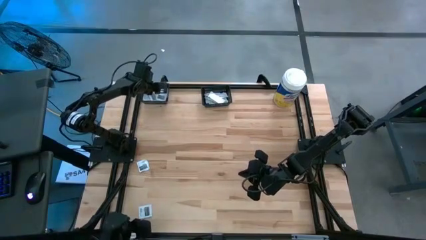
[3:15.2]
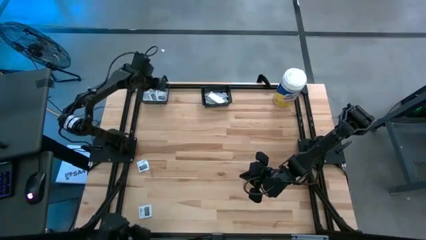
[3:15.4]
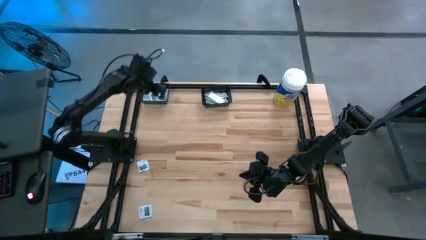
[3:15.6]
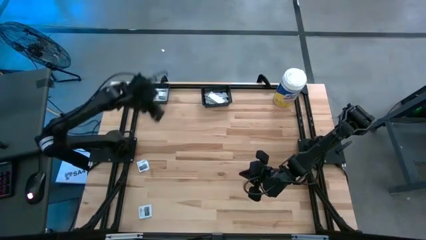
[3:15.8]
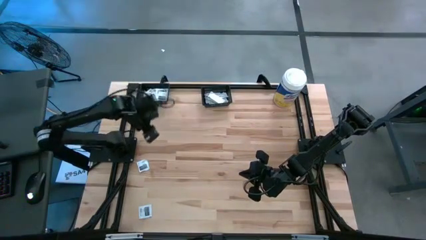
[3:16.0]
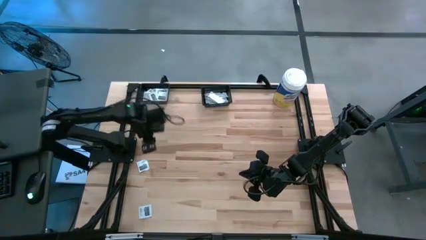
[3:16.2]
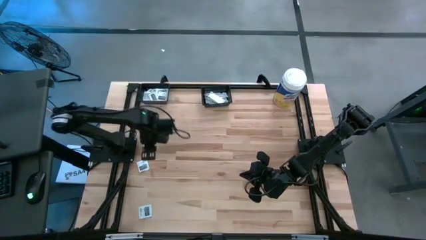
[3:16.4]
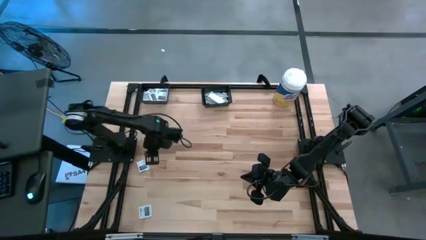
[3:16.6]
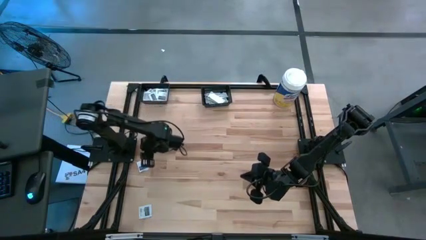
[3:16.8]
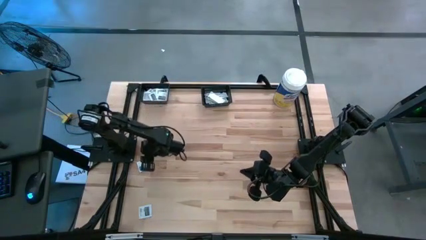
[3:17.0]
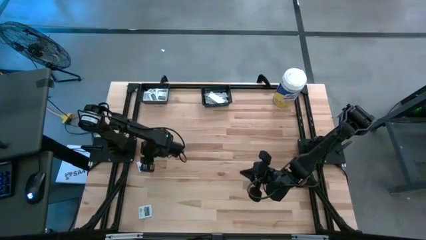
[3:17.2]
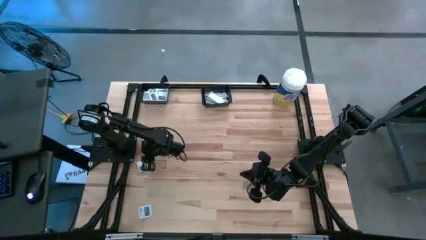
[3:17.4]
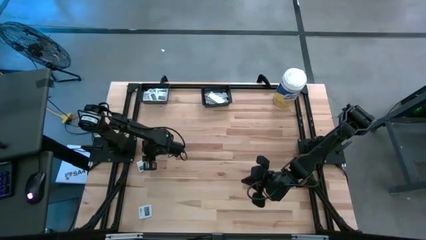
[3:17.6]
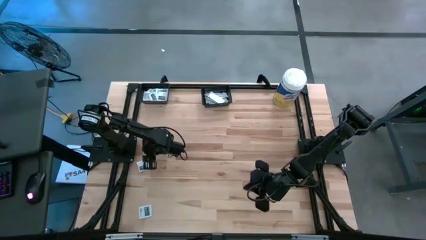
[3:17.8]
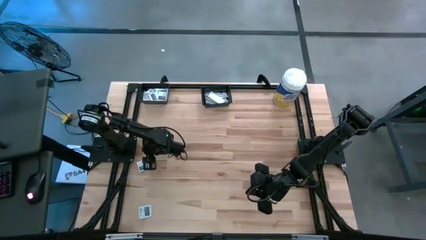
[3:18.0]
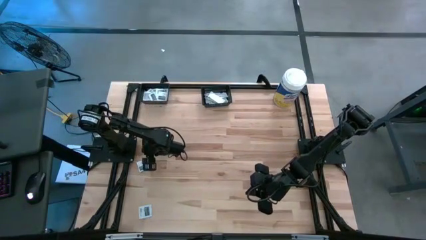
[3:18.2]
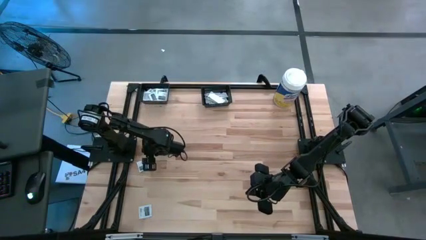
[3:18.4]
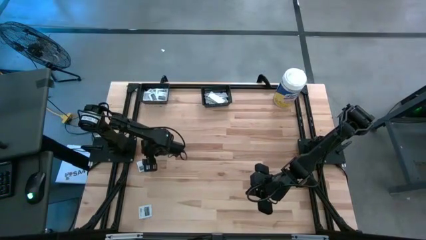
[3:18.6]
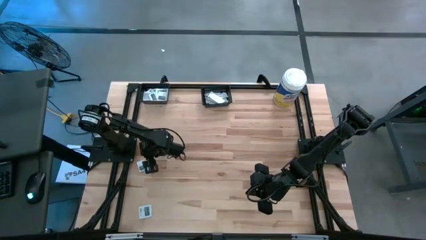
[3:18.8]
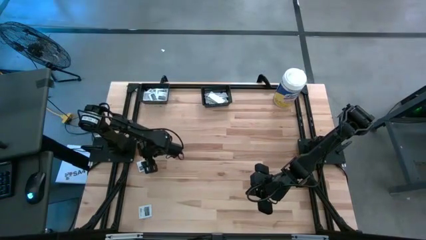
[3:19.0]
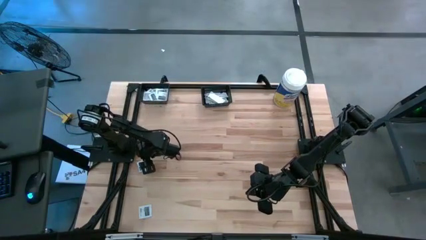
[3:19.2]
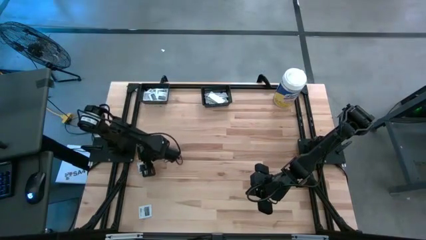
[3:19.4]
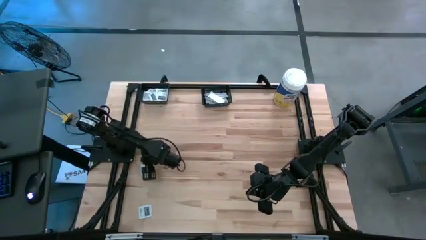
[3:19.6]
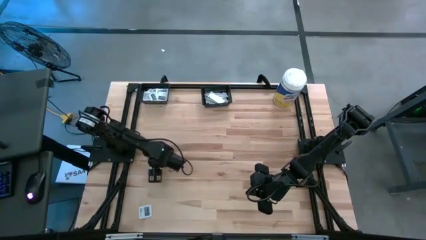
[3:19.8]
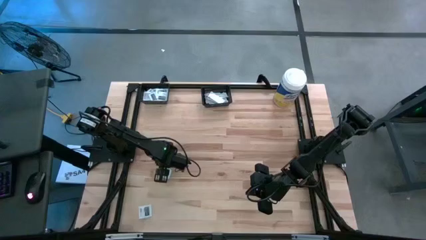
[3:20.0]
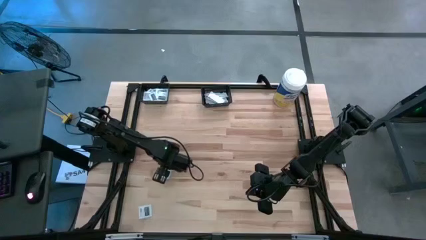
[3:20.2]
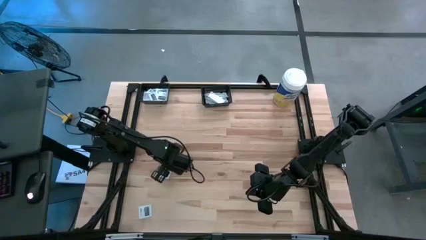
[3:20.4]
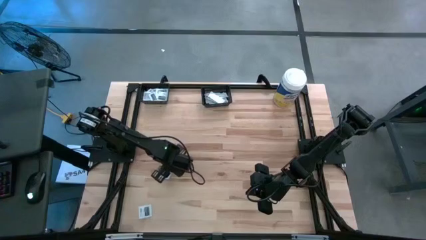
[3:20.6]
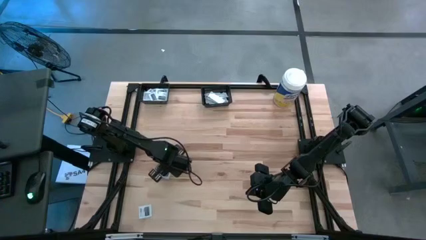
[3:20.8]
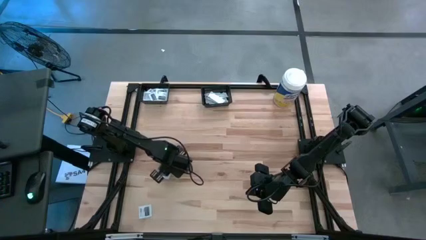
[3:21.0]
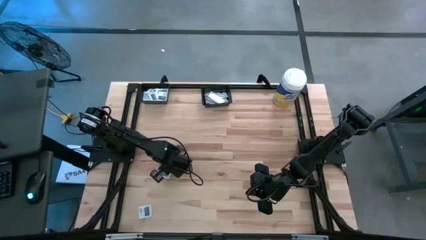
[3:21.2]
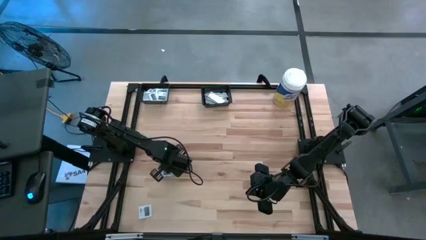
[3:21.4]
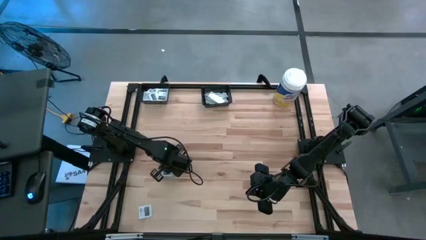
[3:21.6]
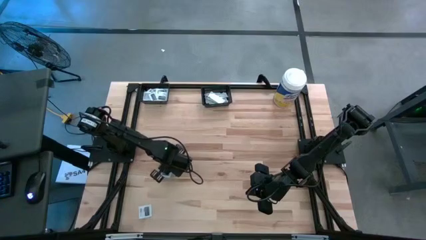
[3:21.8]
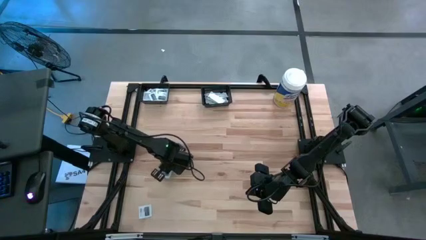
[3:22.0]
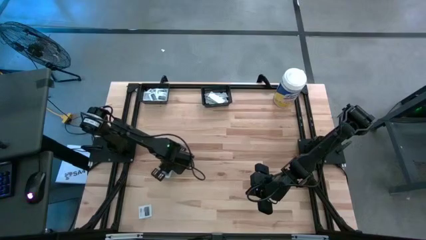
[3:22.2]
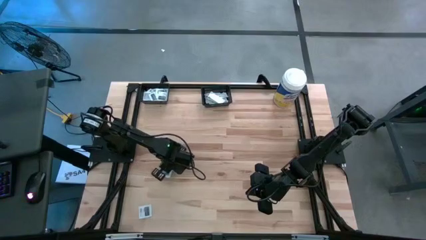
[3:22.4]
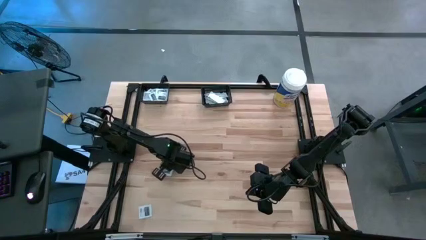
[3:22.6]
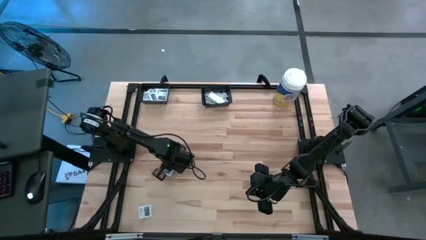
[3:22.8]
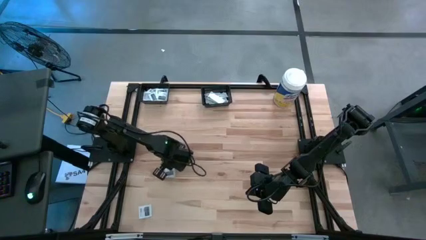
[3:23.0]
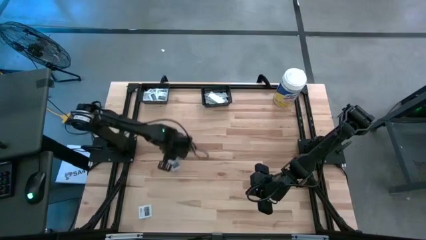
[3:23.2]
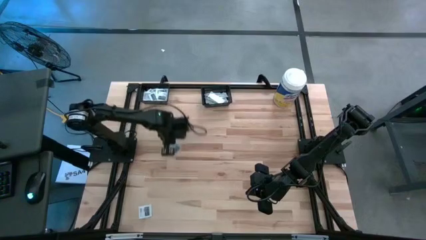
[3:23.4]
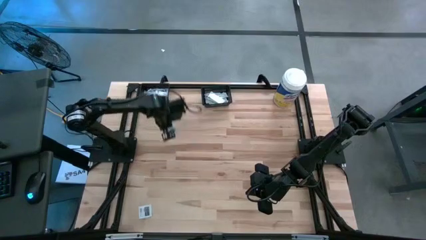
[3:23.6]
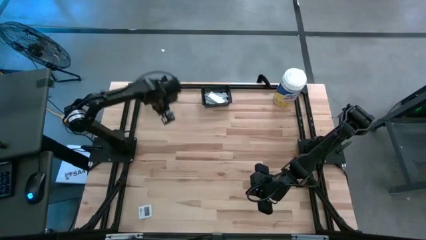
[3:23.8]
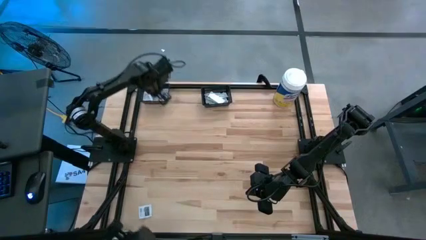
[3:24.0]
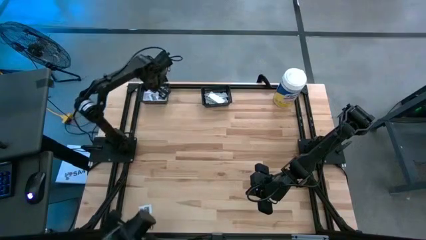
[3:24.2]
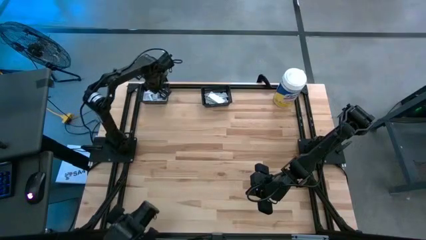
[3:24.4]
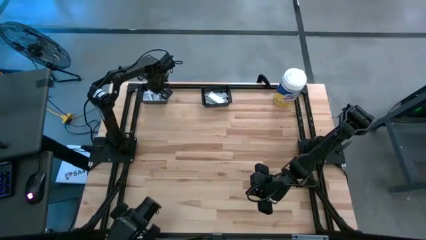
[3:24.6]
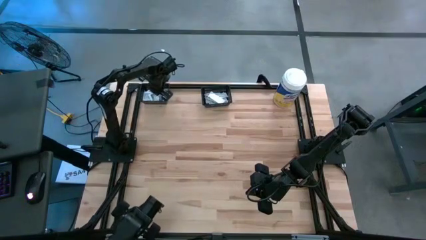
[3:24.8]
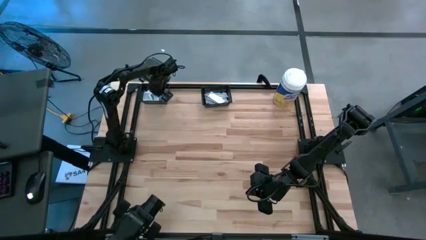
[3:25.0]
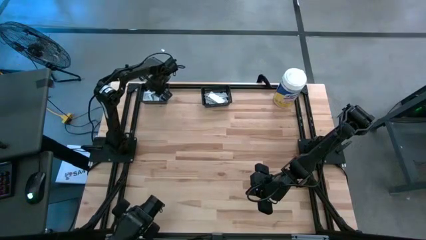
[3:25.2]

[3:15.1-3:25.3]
Task: Pick & Place First Aid Supplies
Put the gray towelette pack into the left black bin

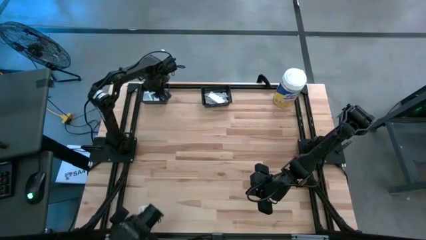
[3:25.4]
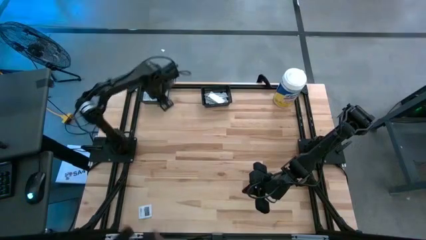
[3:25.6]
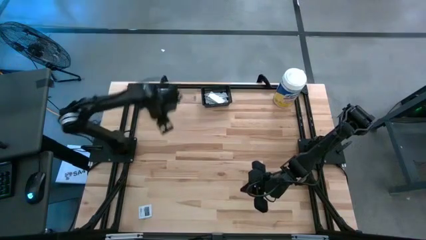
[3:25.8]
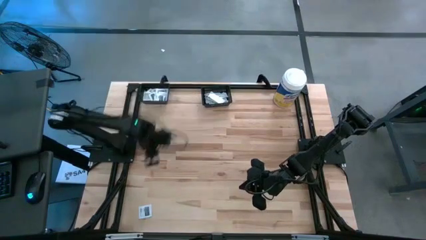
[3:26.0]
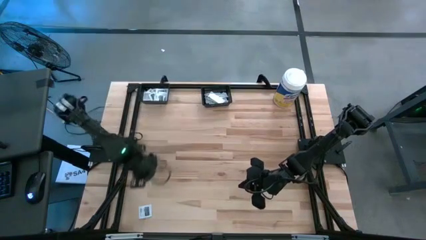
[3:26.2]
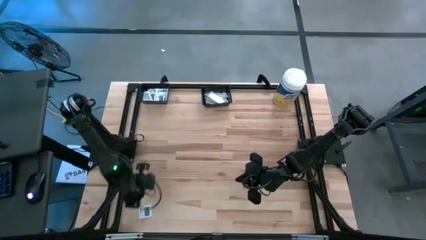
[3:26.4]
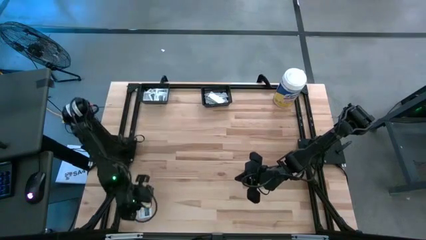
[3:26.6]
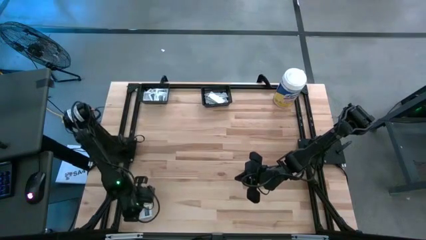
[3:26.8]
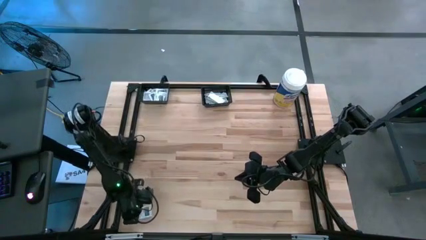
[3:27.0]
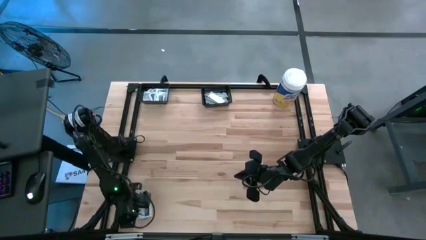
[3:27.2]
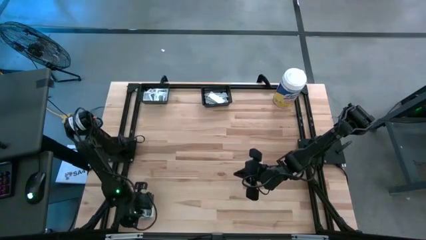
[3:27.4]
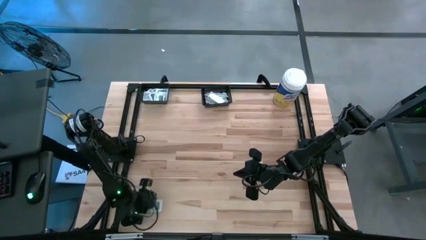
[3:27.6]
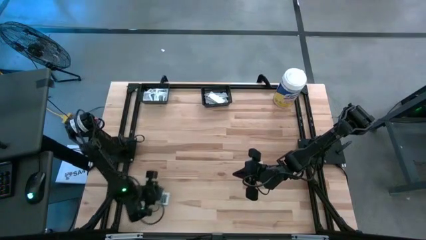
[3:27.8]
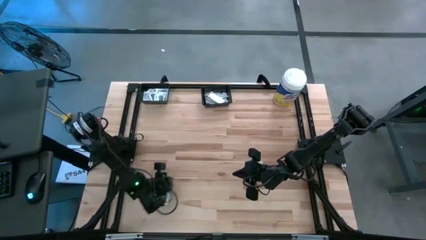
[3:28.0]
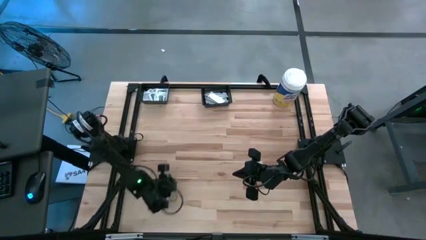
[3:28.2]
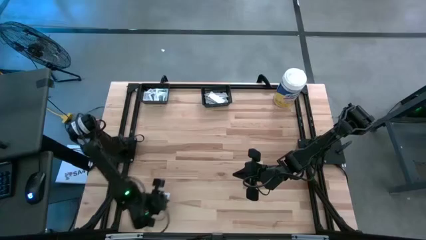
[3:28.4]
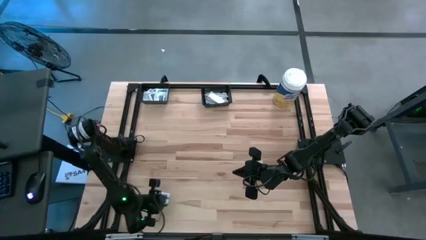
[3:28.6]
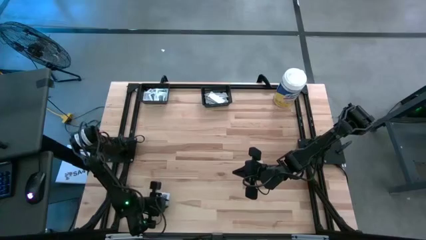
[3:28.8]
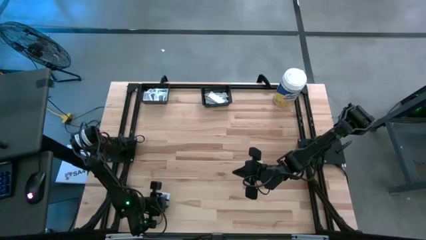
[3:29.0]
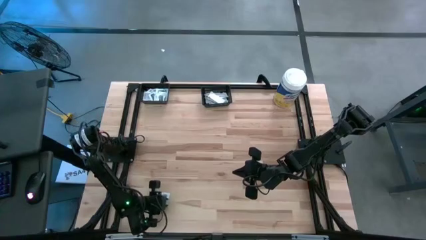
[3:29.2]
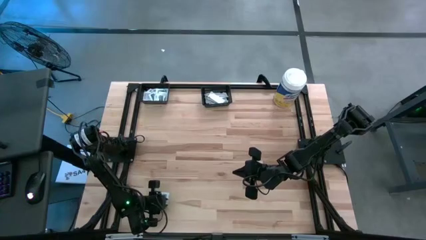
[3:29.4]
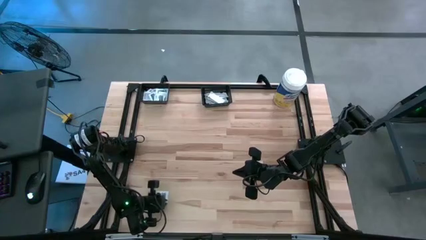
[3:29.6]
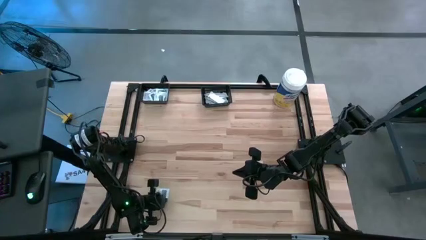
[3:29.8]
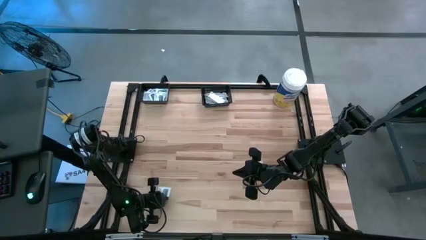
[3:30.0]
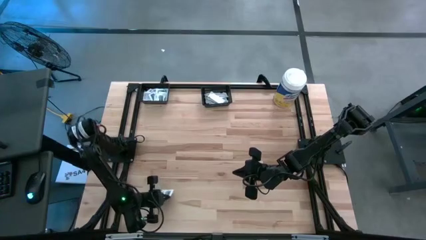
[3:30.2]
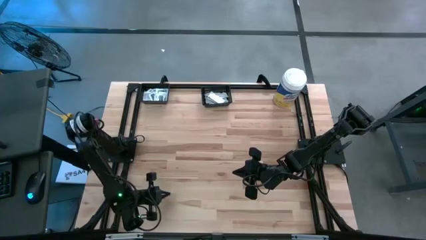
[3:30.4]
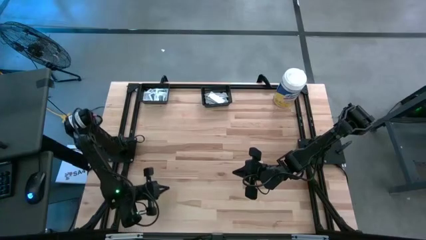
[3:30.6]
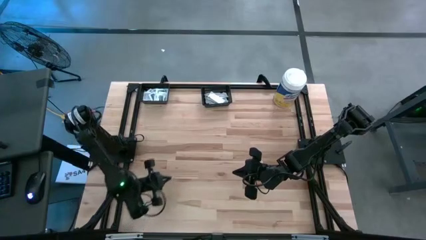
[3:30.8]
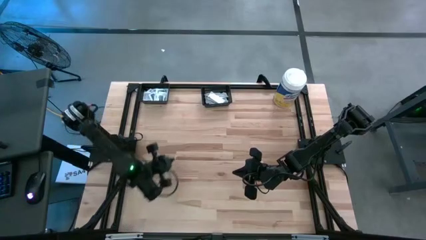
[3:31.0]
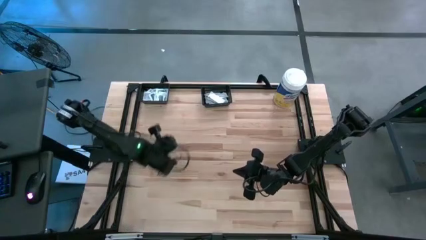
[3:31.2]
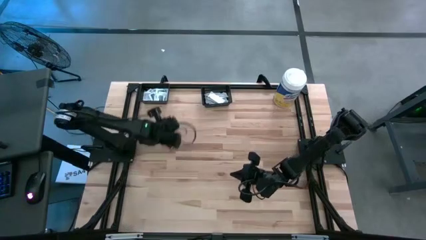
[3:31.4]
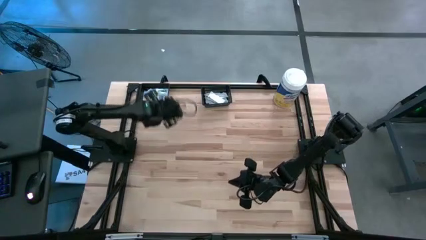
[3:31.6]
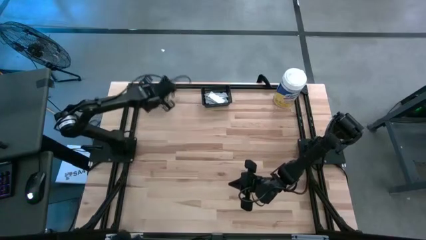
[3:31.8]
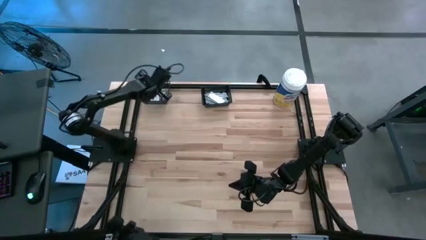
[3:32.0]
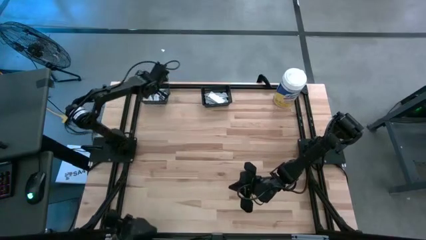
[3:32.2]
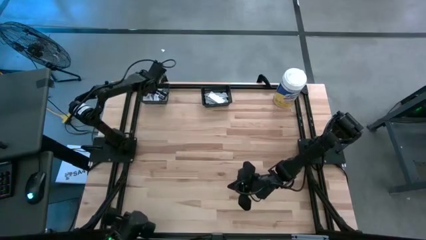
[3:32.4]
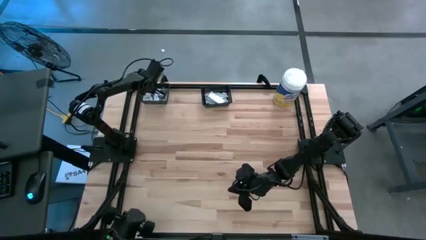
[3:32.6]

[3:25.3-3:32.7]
Put the gray towelette pack into the left black bin
